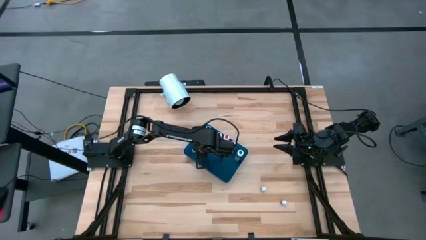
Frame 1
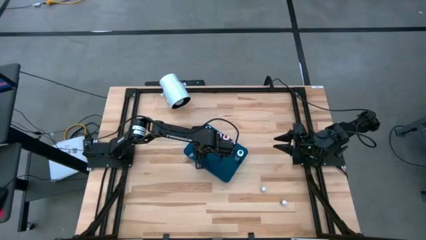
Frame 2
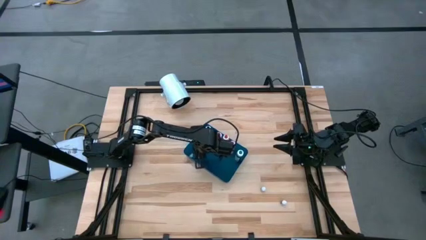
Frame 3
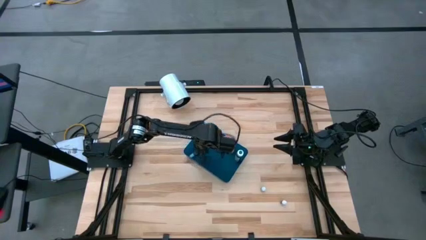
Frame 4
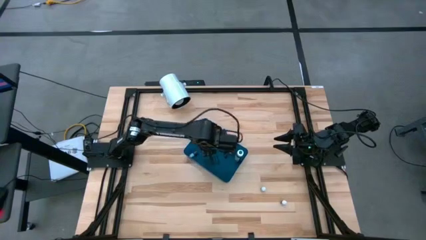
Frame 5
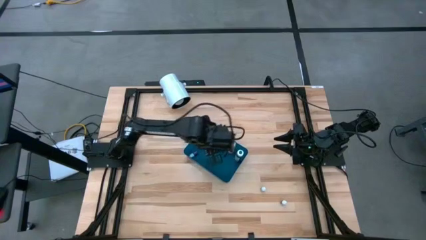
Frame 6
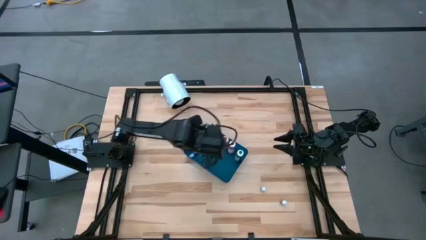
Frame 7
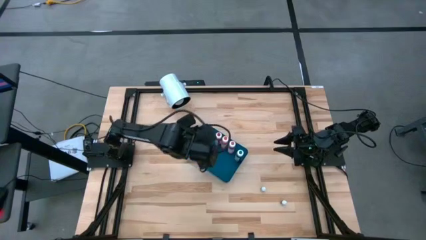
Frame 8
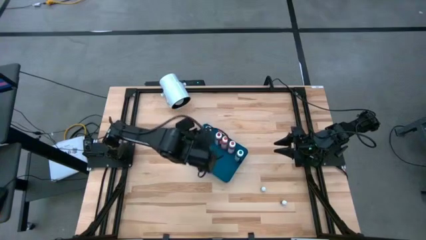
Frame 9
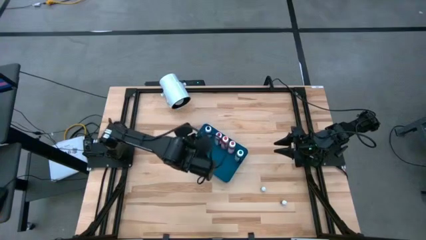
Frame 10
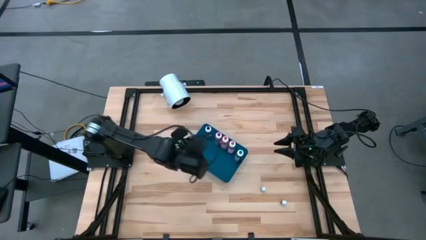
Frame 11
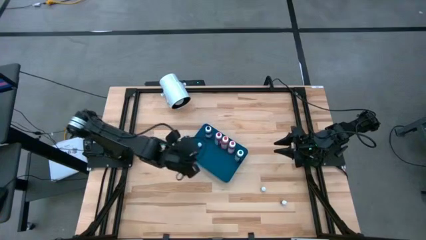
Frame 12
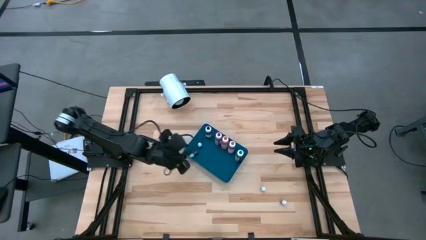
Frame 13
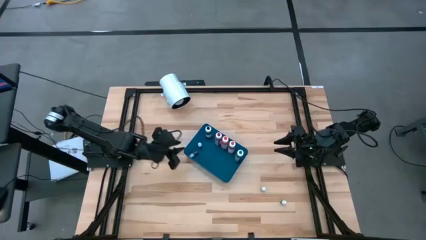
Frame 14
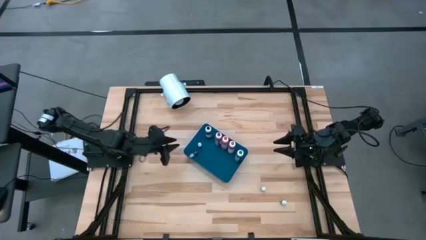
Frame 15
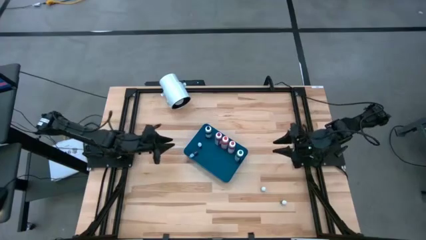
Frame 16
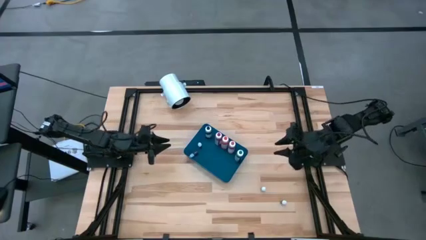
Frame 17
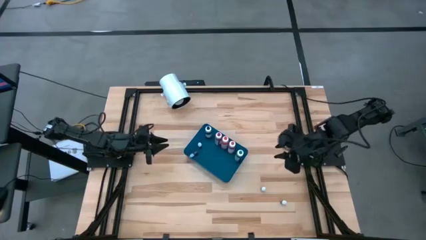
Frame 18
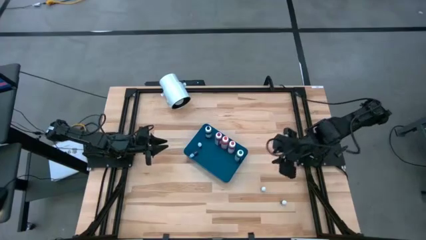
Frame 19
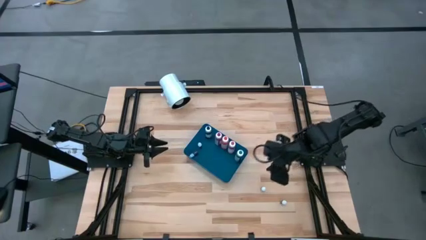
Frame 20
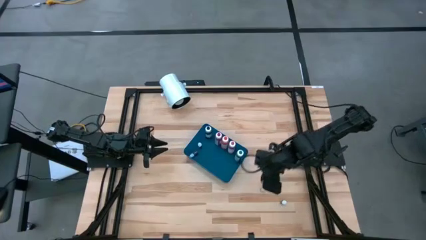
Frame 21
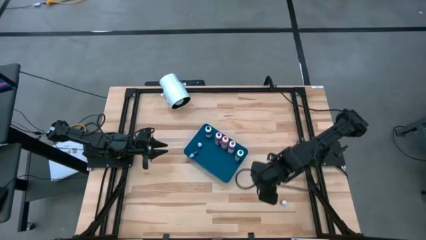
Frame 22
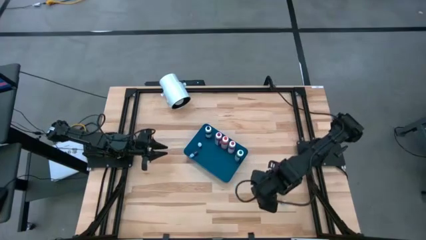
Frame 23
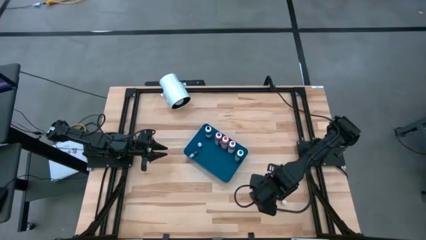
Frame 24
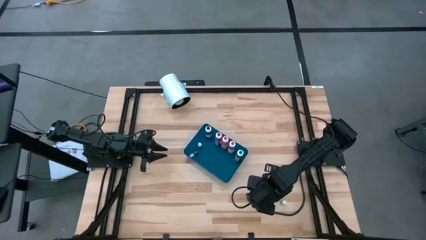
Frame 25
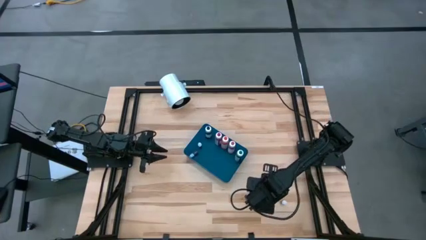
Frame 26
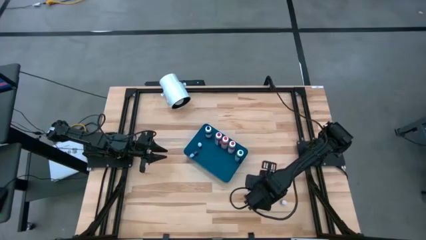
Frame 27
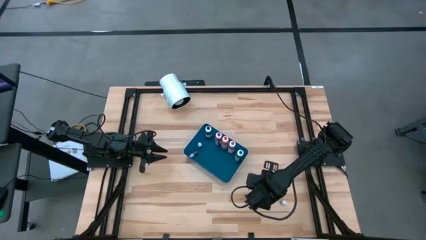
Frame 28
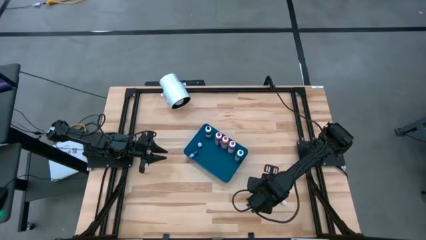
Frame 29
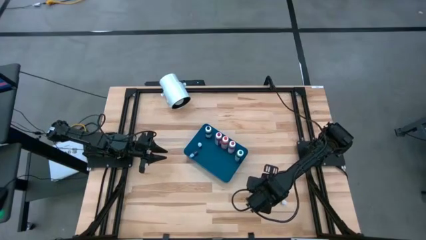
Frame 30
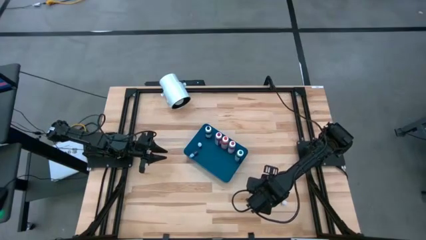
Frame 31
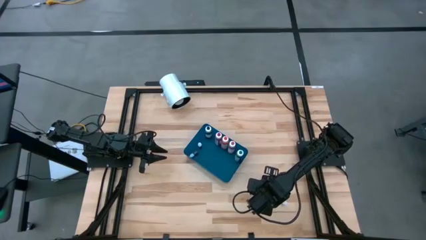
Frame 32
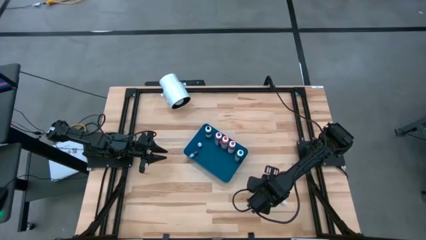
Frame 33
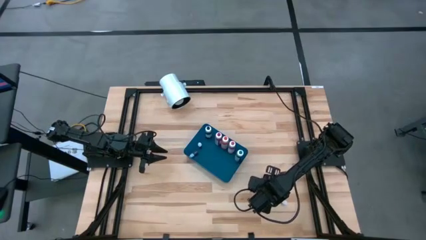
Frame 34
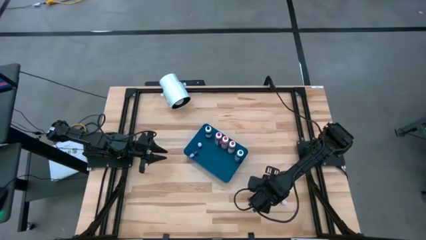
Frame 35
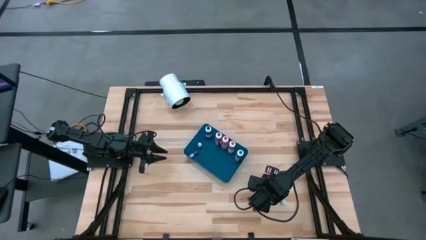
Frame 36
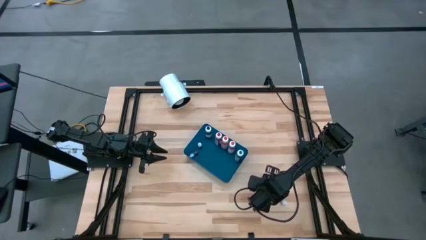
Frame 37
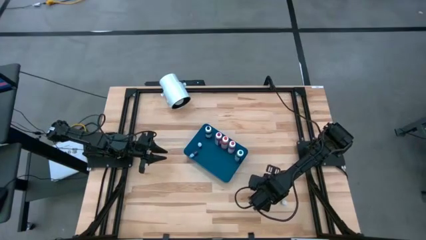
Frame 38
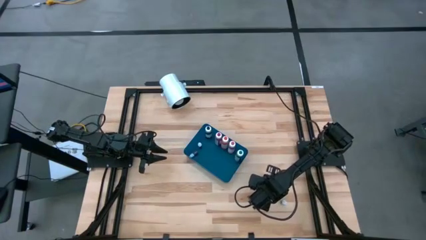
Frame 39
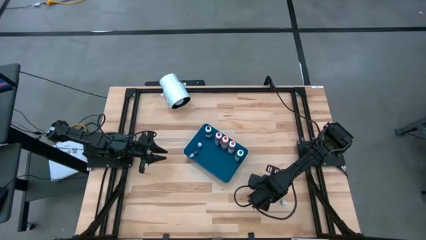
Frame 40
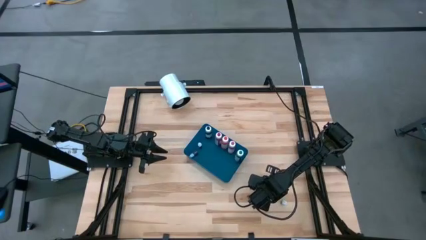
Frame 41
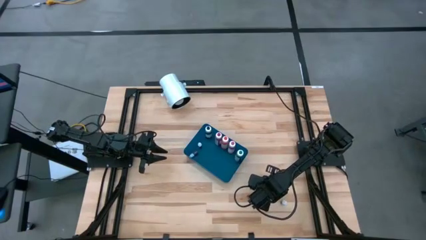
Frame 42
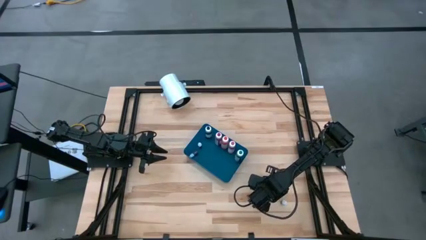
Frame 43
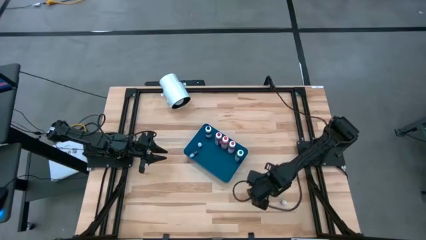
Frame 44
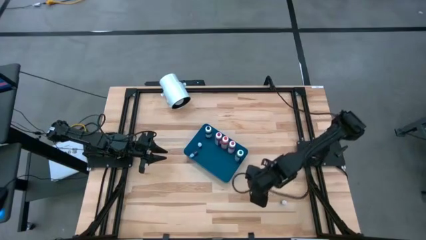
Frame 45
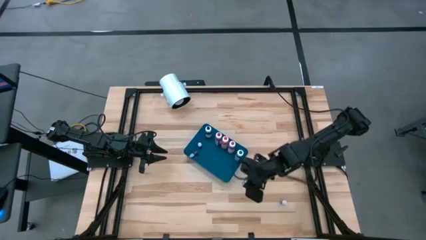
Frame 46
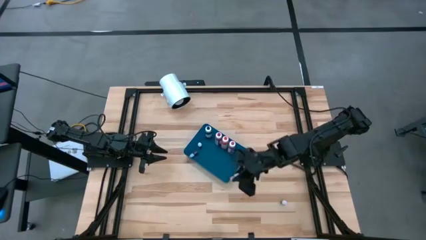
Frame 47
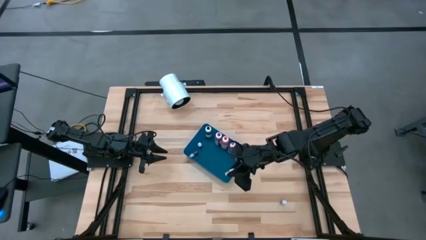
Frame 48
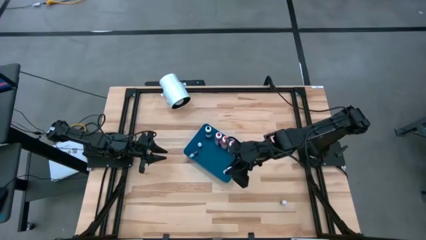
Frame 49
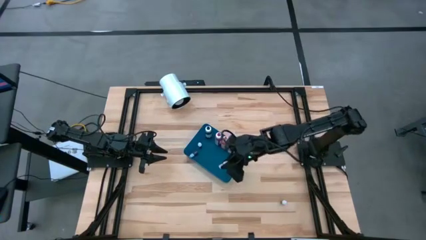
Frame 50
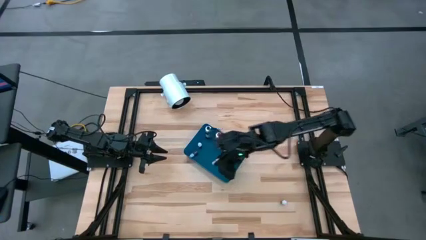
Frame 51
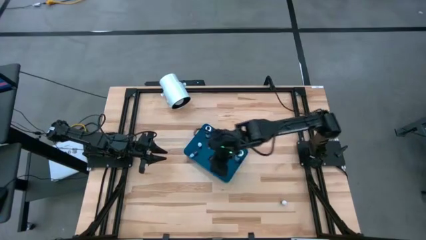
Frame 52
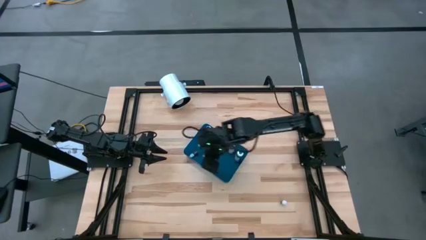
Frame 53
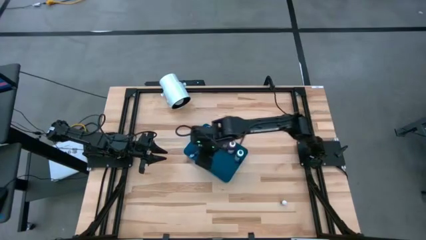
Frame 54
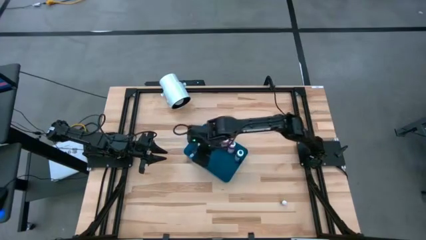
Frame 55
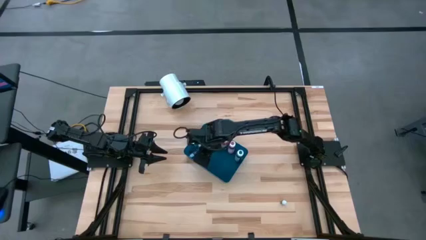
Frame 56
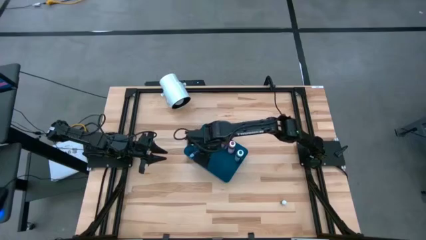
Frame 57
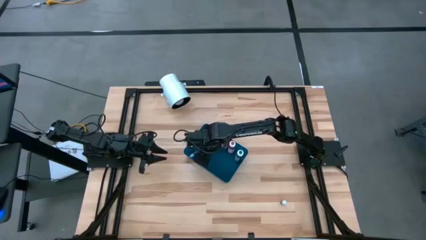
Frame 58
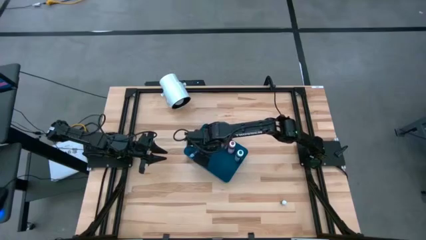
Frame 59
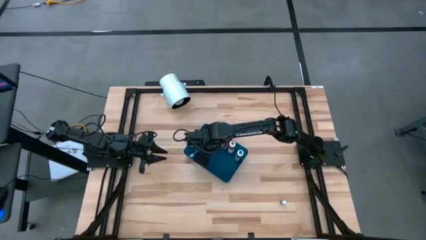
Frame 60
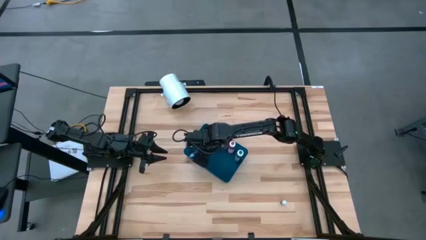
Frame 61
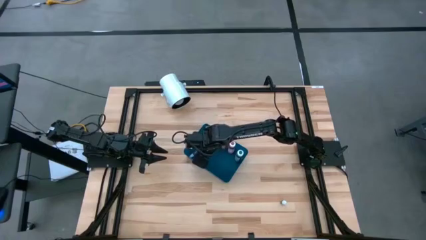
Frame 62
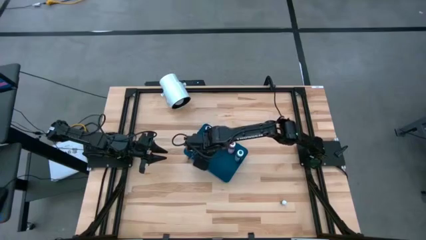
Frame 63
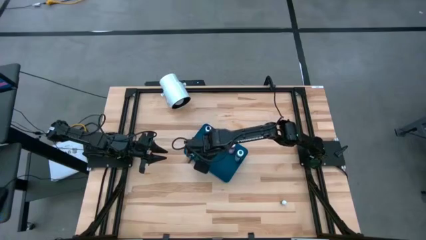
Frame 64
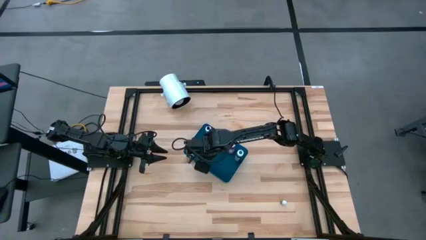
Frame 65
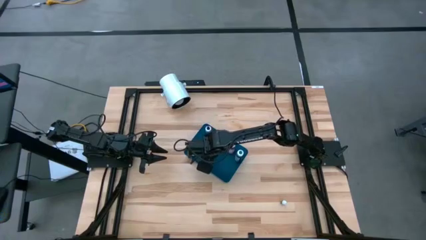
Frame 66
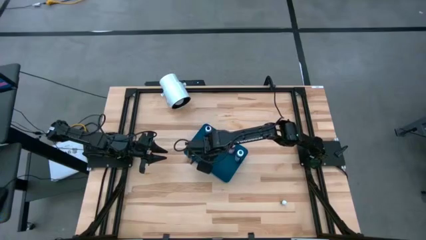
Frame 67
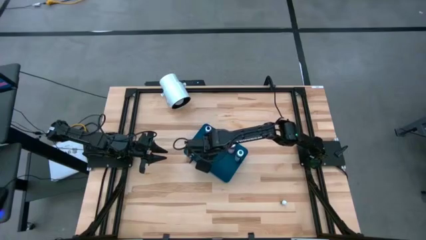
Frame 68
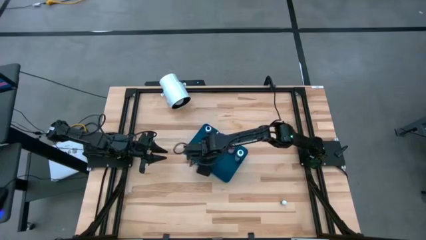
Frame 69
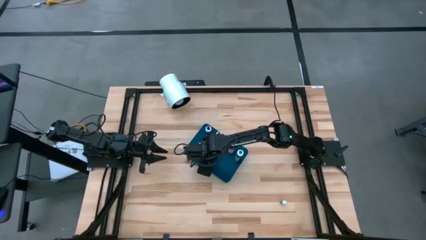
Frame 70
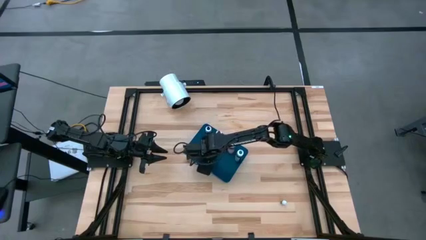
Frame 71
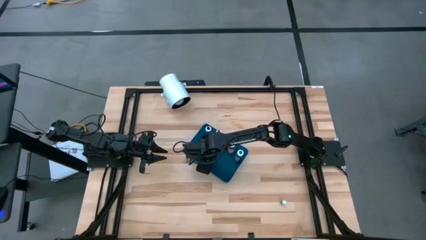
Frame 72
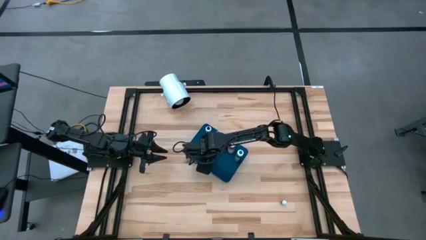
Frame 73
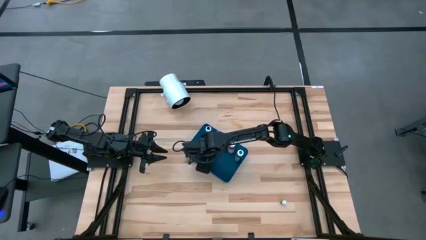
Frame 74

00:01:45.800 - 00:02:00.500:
Task: Pick & Place food coloring
Put the small brown food coloring bottle into the blue bin
